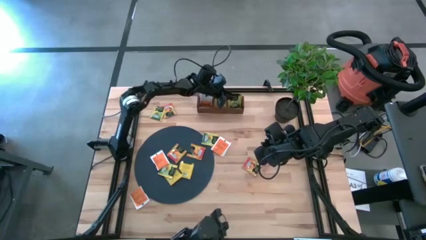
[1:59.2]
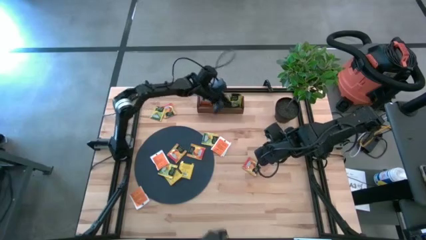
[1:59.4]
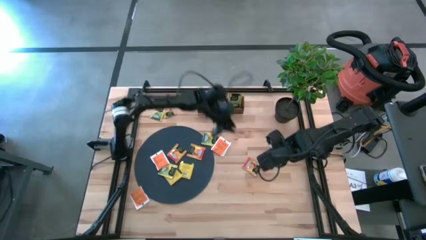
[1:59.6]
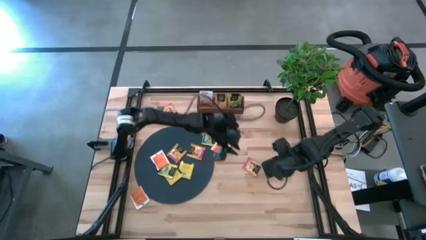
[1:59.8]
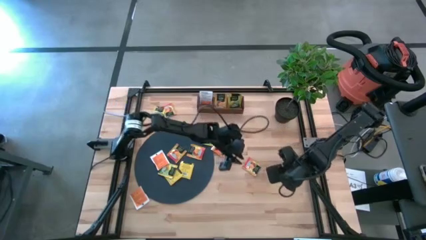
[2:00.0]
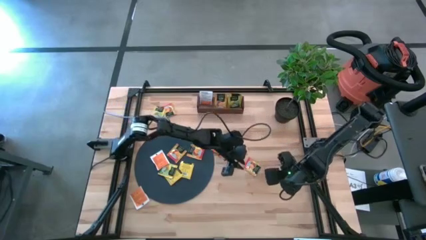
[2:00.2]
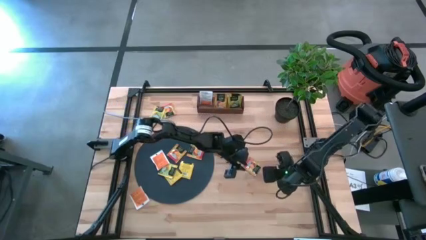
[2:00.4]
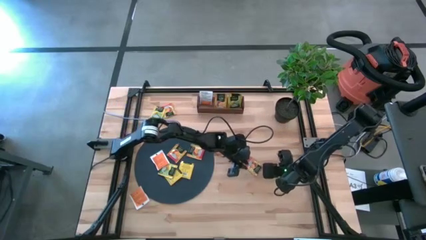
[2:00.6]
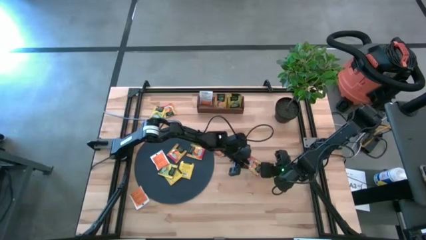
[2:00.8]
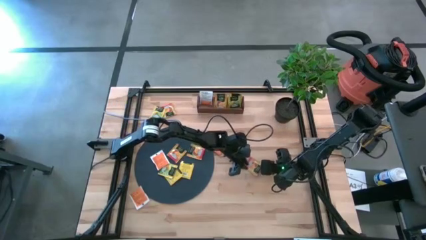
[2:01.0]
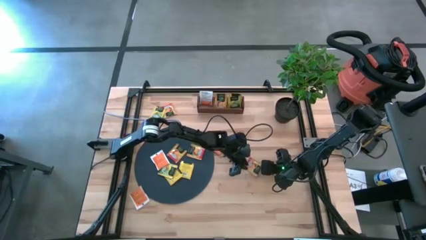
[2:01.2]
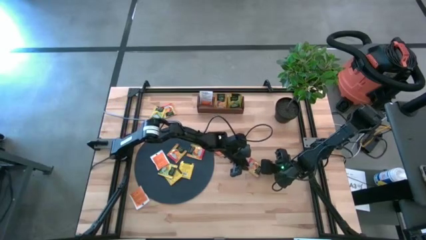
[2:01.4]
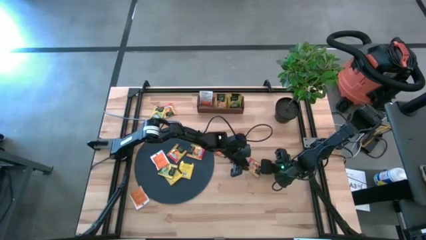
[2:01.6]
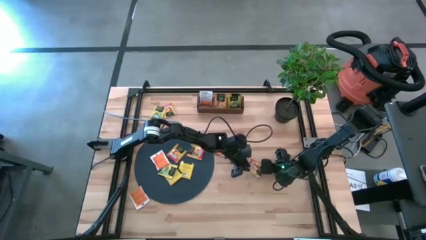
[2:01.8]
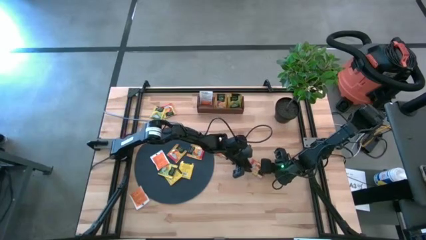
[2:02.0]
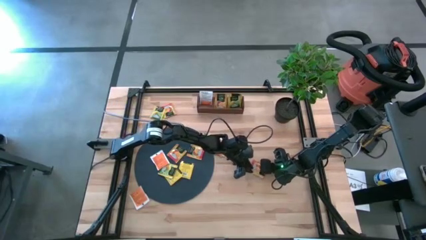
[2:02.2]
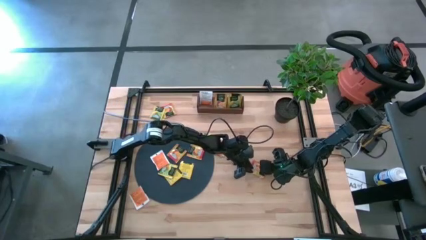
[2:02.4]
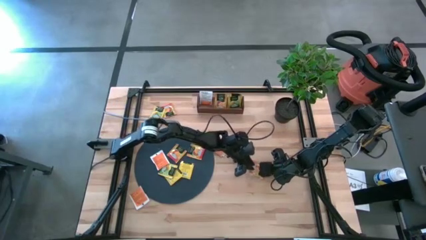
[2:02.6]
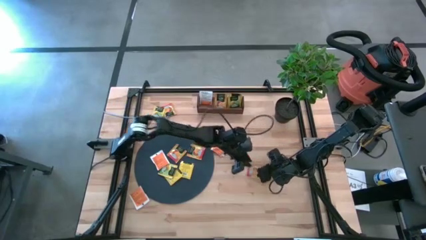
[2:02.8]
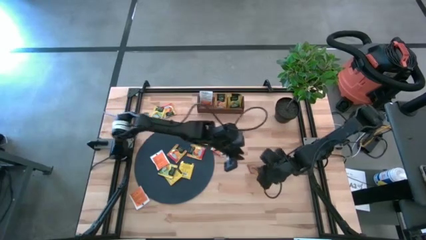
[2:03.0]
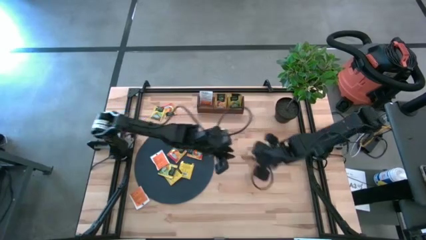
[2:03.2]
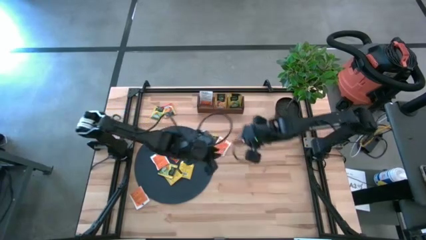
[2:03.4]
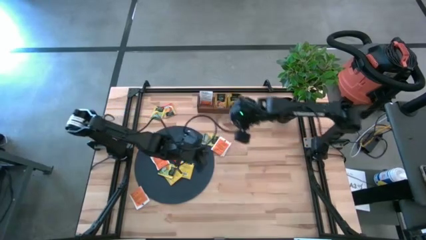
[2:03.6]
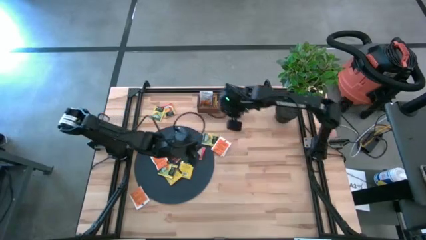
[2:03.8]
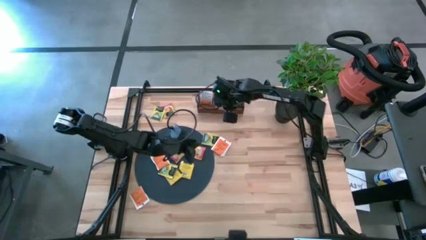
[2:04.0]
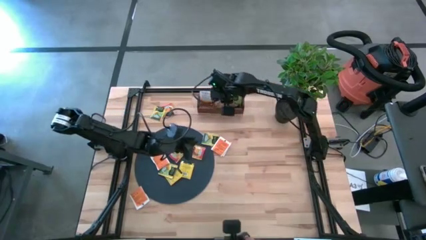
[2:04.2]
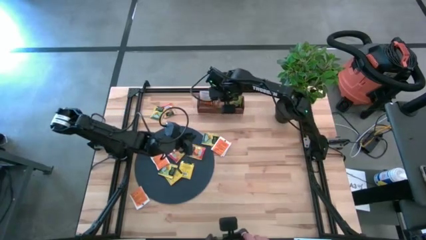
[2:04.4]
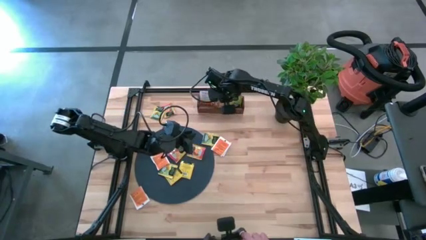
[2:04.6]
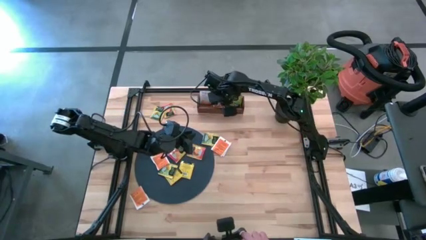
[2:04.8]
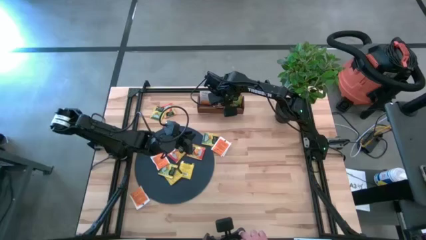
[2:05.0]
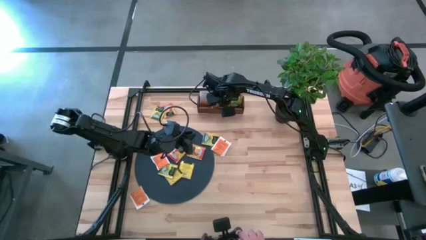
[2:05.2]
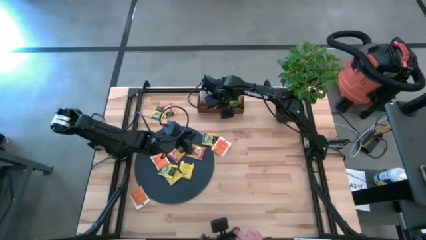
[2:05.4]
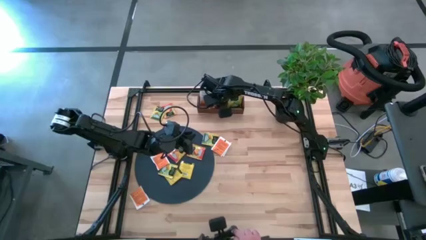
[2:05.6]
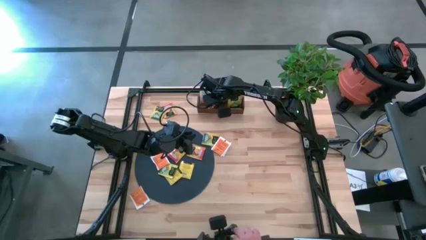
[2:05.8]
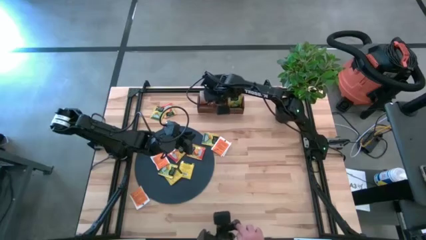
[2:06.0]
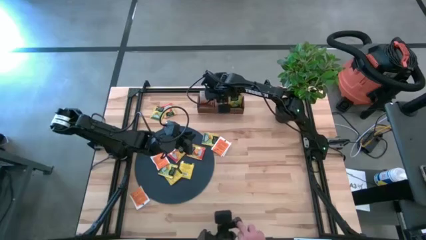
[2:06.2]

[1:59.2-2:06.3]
Task: Pick & Place Tea
Put the yellow tea bag into the middle section of the wooden organizer

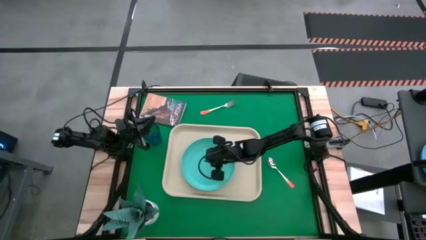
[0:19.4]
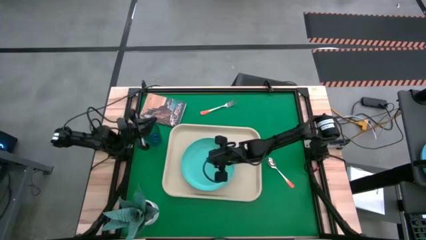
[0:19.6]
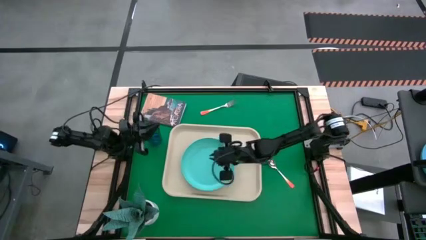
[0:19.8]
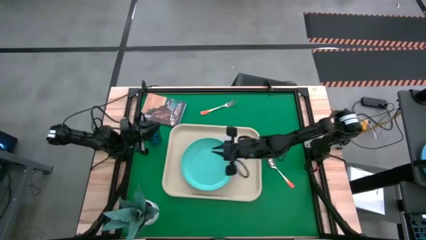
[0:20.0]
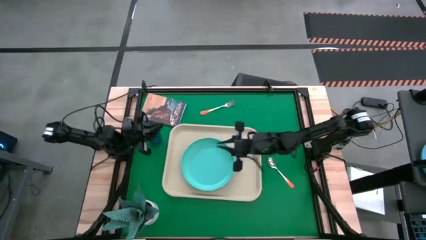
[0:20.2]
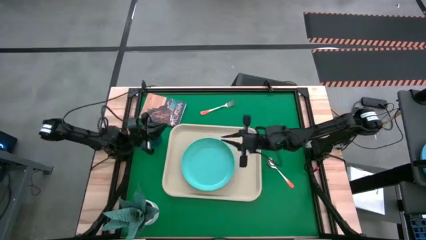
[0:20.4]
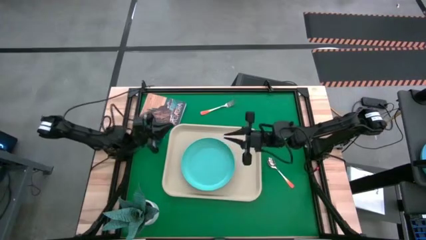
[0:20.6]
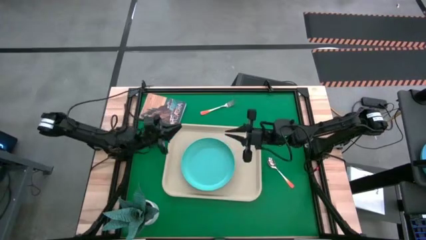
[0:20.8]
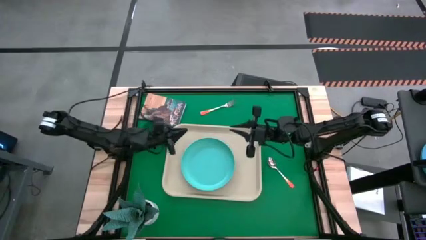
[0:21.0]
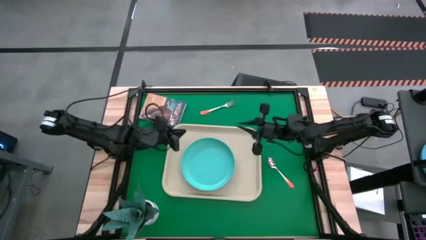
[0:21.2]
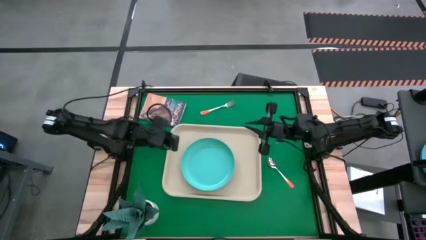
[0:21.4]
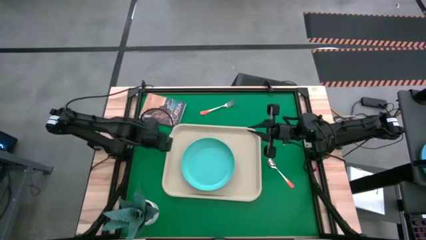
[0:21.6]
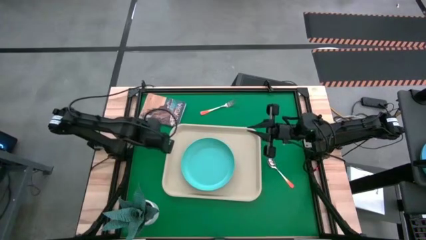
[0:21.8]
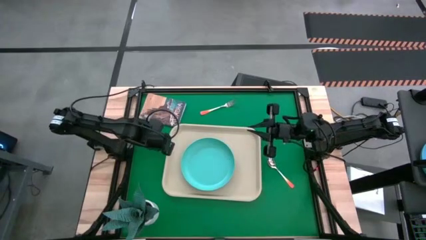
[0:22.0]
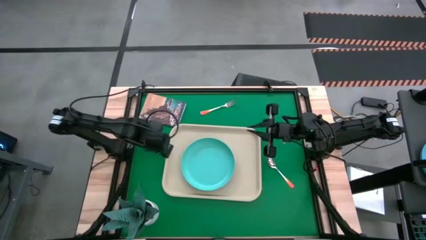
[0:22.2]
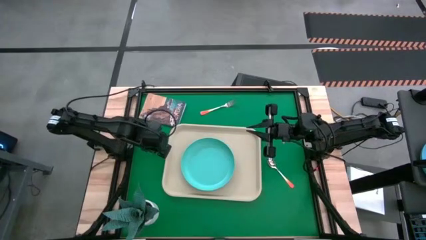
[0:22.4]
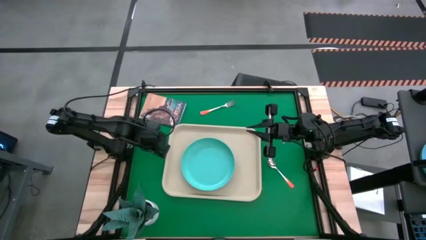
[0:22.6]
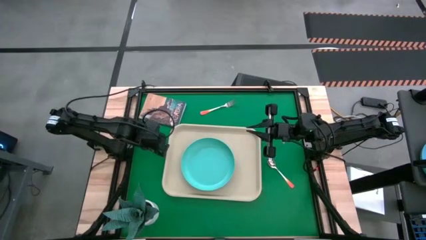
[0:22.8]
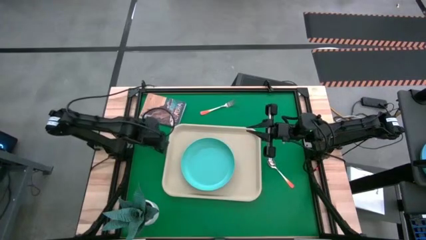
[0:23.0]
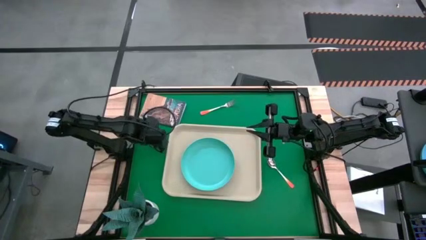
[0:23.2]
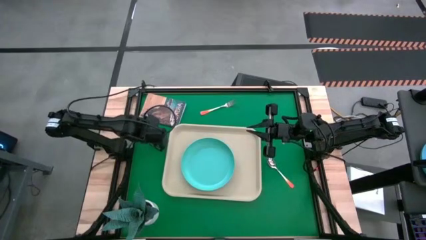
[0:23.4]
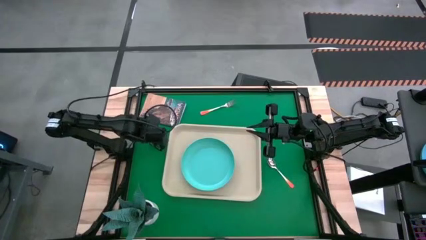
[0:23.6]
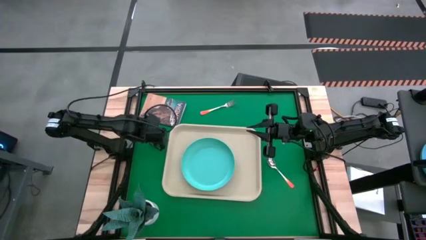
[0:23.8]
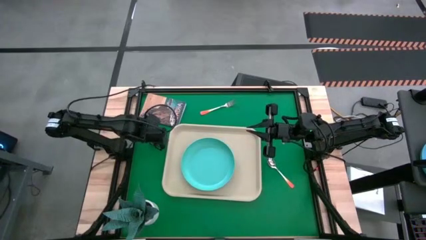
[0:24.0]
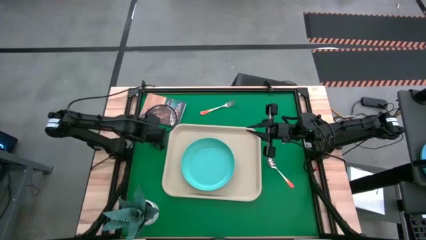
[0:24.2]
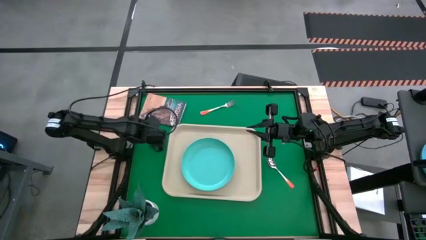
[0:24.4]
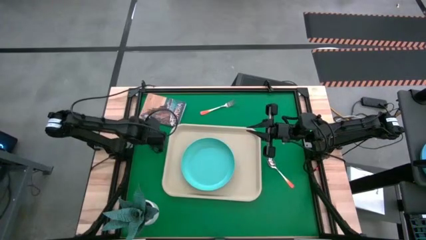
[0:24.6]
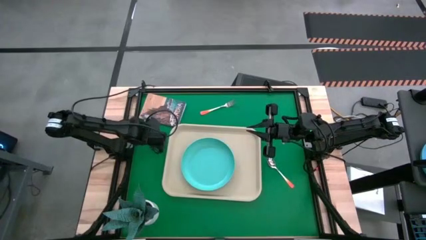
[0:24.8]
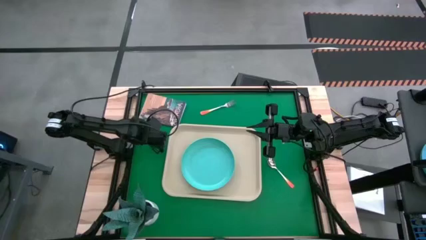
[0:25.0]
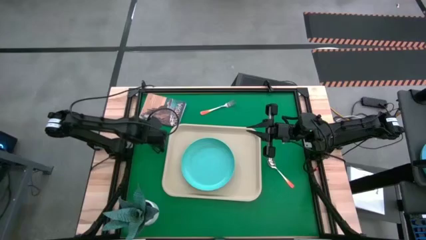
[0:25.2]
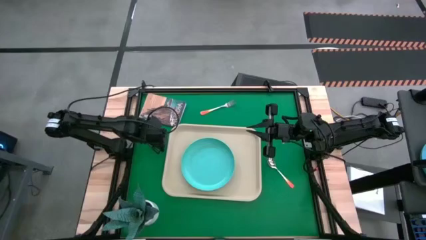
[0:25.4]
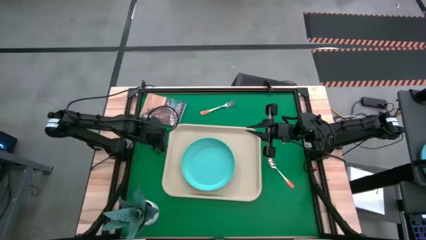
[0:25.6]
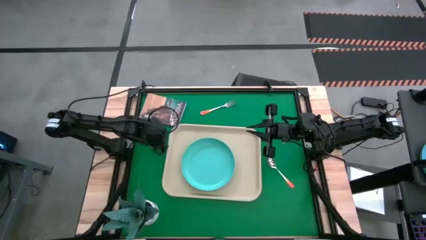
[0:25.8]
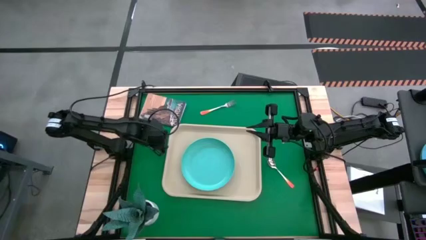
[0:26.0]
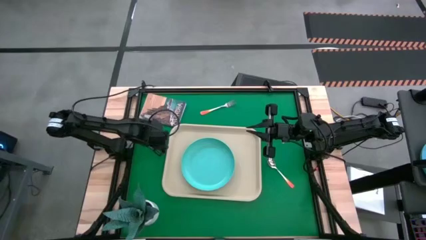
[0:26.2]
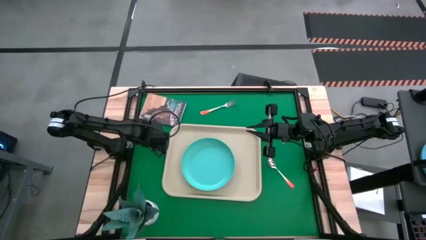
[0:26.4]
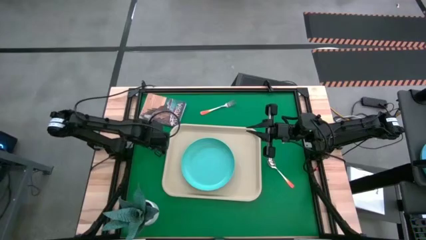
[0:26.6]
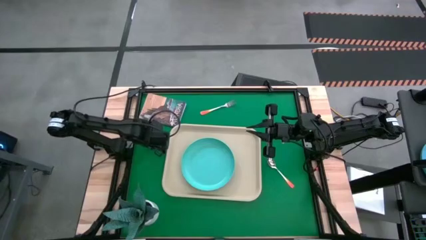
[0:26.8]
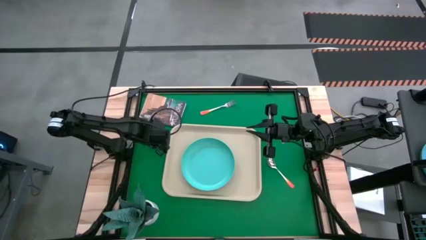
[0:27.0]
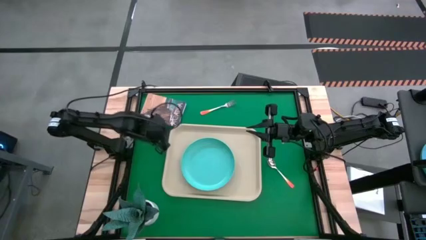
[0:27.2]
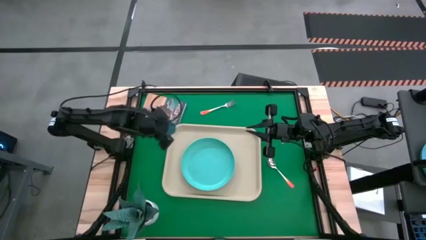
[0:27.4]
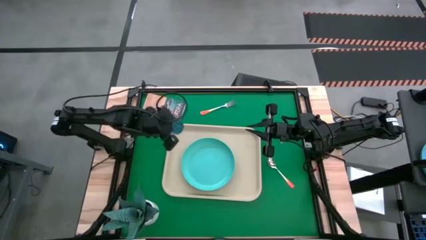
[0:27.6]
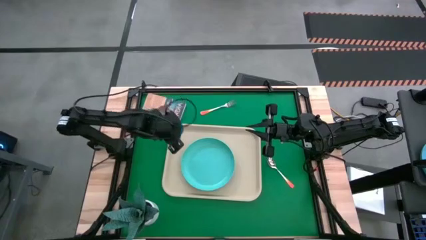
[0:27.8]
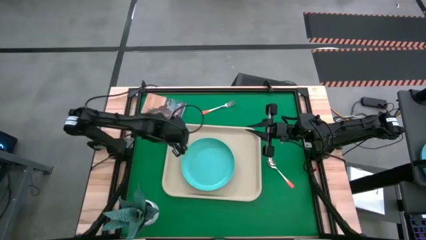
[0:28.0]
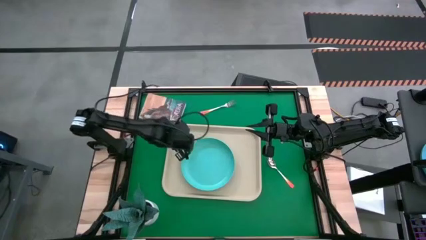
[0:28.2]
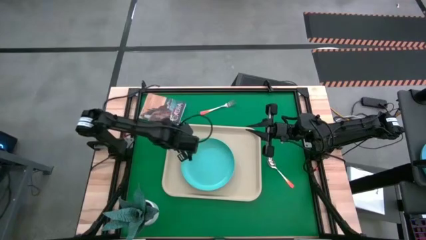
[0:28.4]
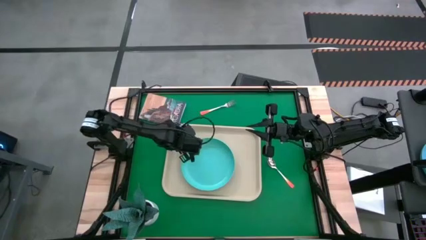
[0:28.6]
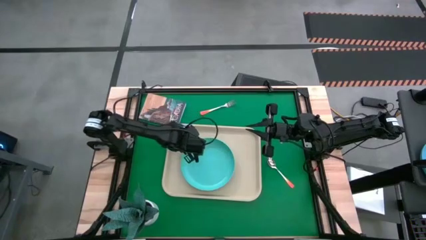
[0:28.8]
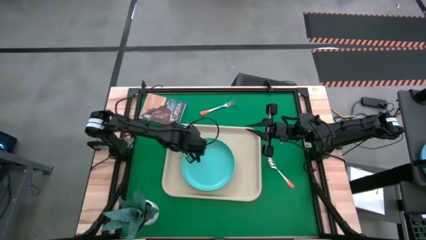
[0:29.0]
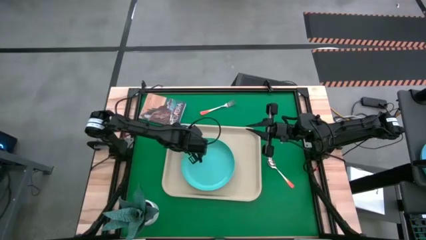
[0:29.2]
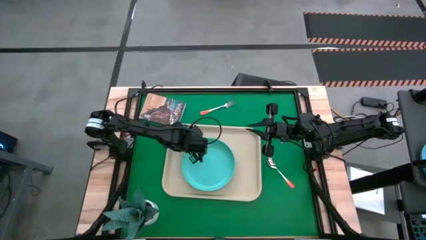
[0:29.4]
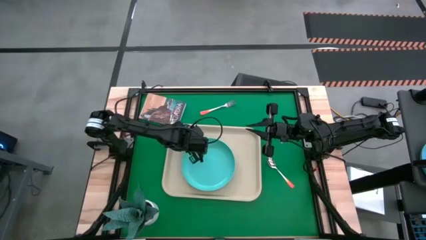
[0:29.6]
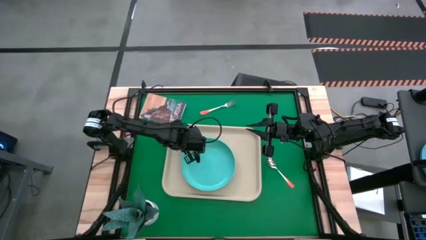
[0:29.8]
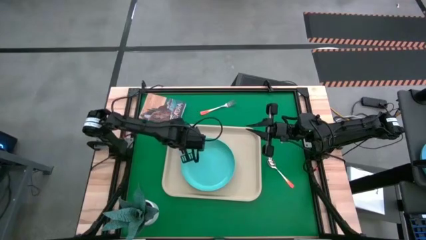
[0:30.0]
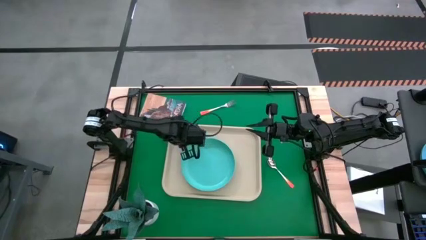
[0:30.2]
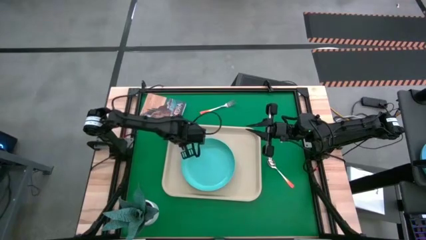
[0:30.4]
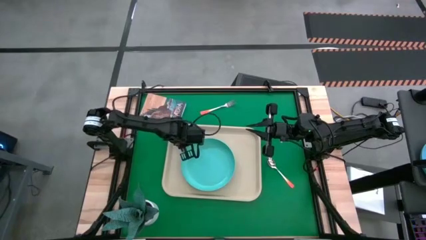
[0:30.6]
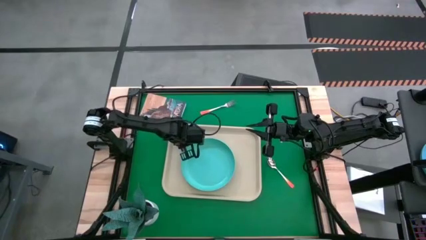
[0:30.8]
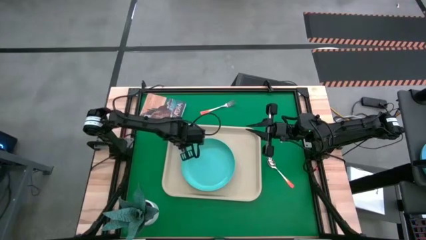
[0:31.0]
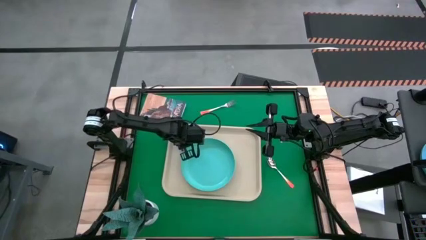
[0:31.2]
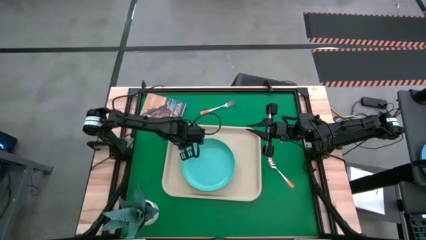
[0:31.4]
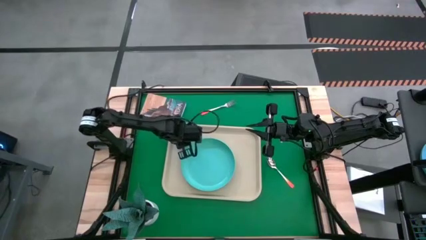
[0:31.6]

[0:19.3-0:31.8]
Task: Pick and place plate/cup/fork/spoon on tray
Put the blue glass on the white tray to the top left of the blue plate
